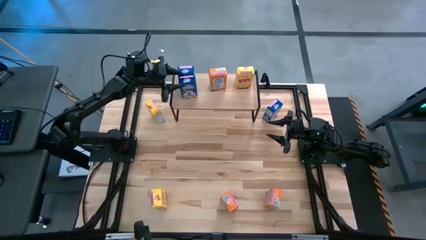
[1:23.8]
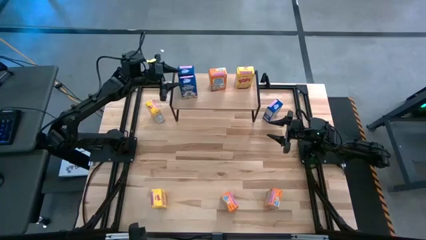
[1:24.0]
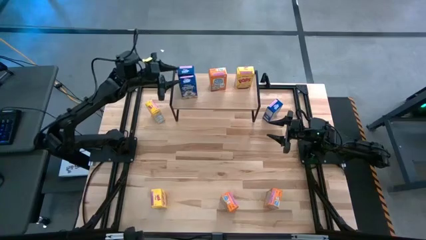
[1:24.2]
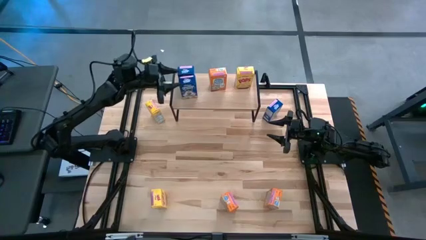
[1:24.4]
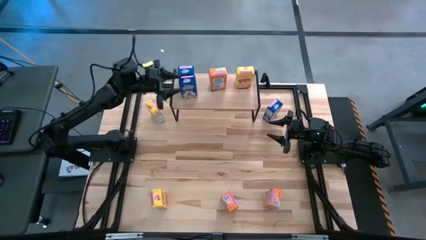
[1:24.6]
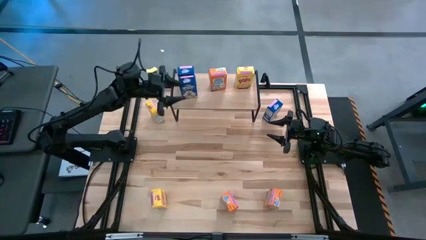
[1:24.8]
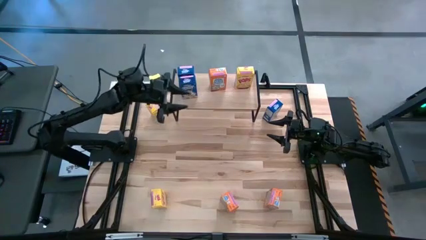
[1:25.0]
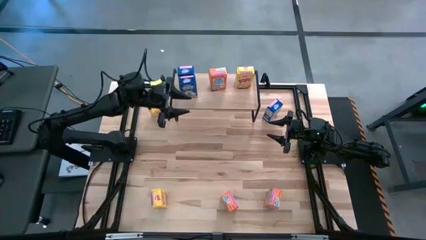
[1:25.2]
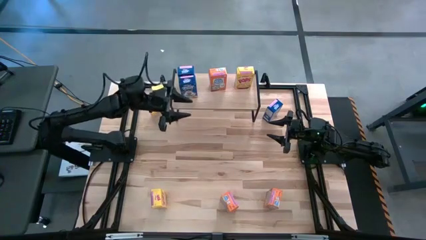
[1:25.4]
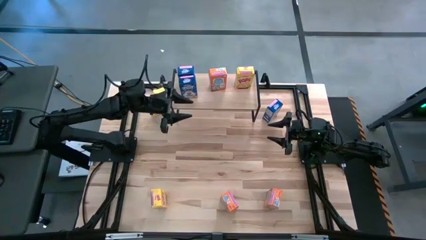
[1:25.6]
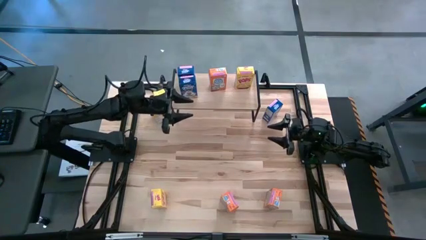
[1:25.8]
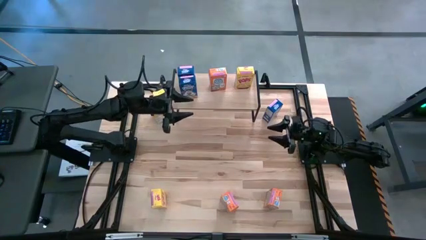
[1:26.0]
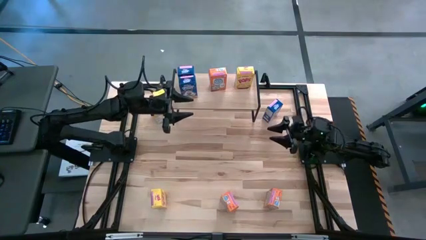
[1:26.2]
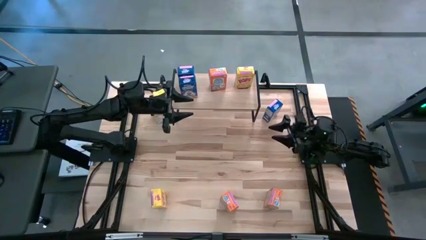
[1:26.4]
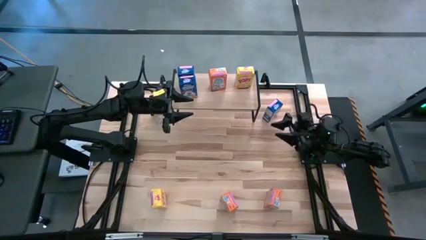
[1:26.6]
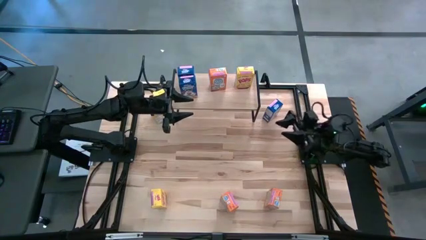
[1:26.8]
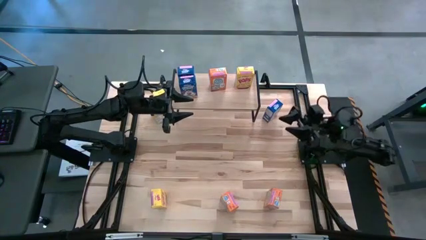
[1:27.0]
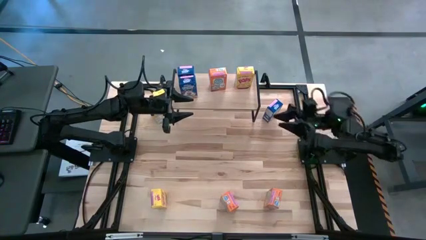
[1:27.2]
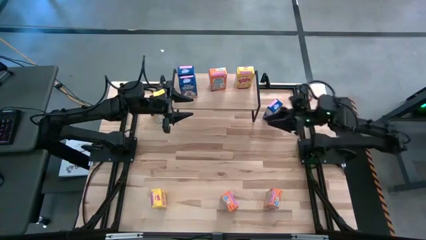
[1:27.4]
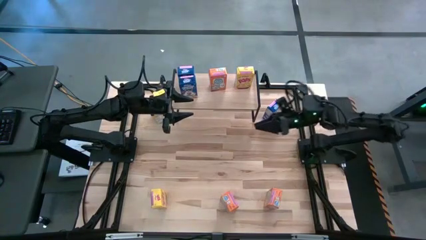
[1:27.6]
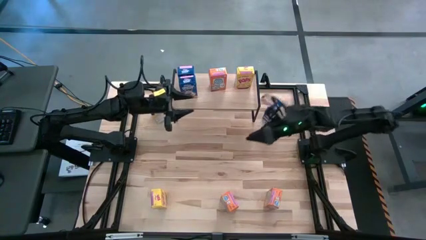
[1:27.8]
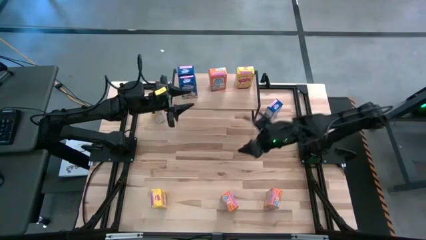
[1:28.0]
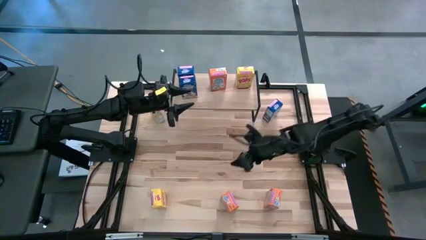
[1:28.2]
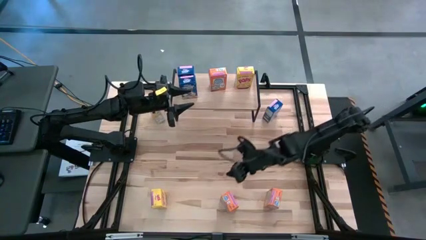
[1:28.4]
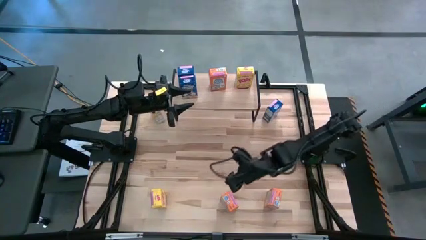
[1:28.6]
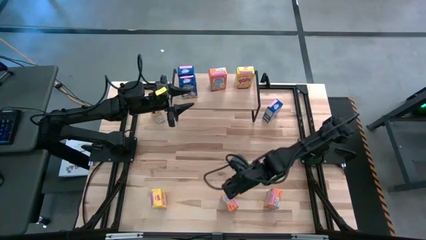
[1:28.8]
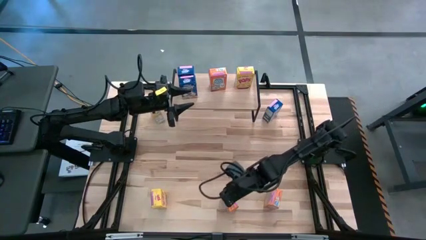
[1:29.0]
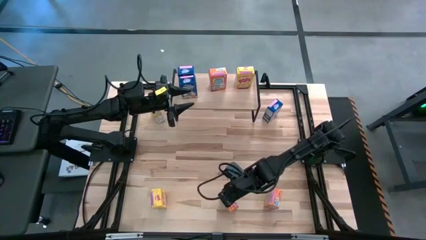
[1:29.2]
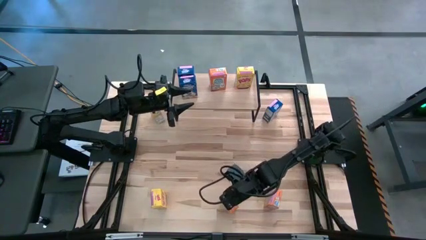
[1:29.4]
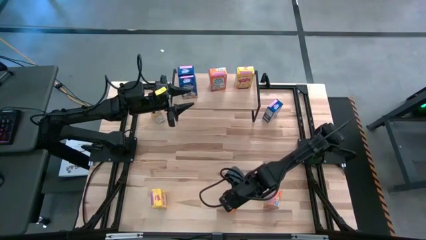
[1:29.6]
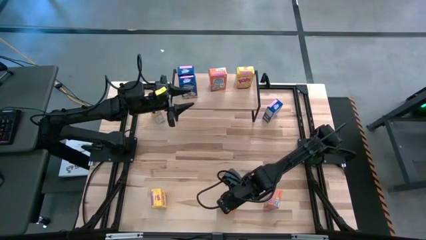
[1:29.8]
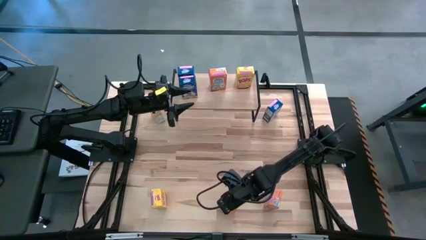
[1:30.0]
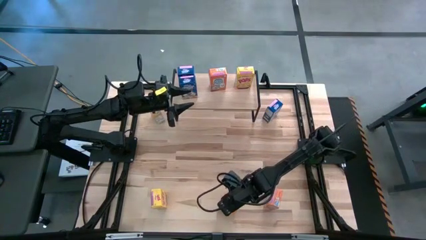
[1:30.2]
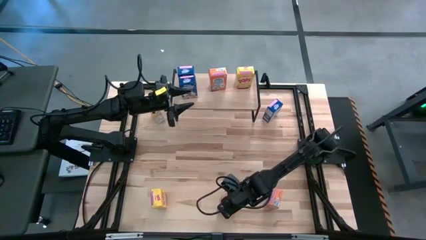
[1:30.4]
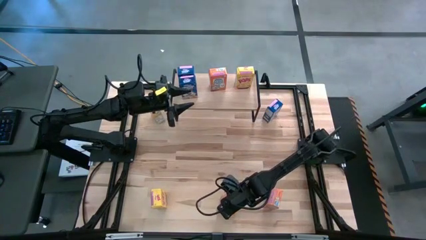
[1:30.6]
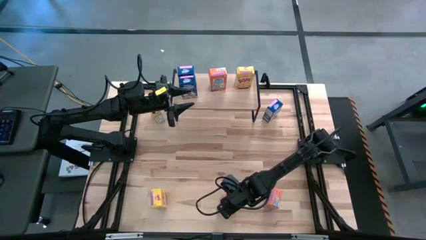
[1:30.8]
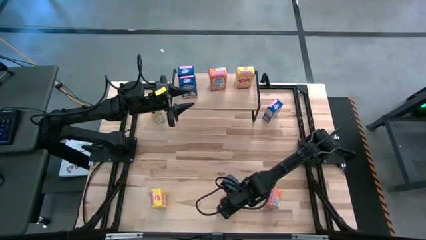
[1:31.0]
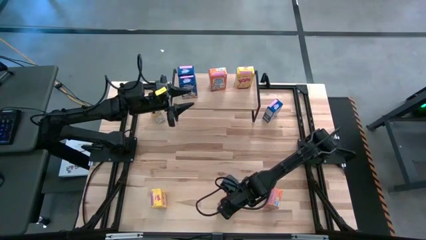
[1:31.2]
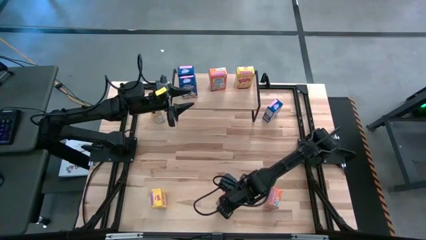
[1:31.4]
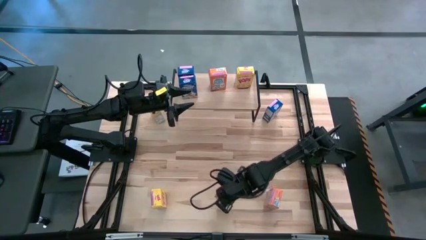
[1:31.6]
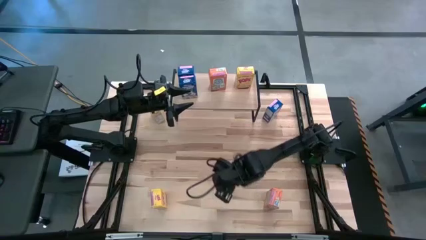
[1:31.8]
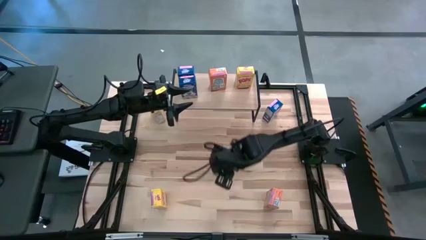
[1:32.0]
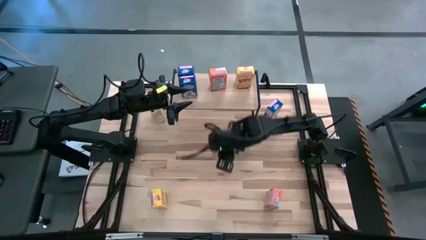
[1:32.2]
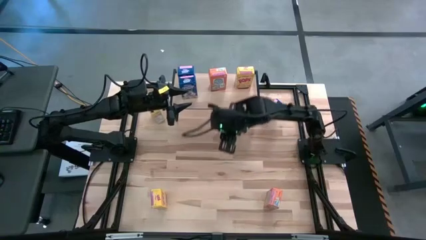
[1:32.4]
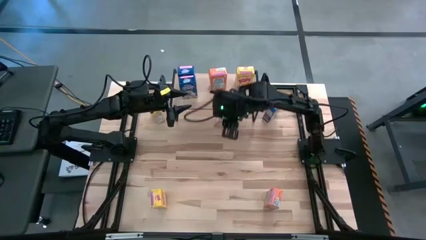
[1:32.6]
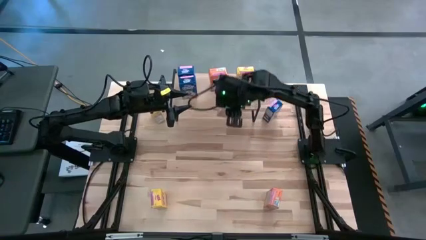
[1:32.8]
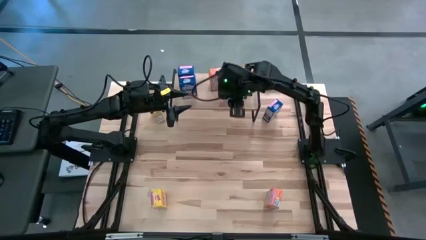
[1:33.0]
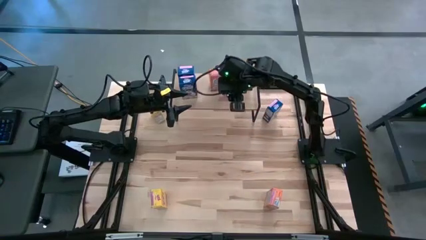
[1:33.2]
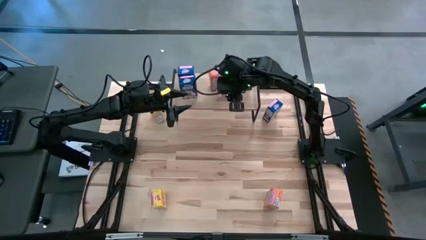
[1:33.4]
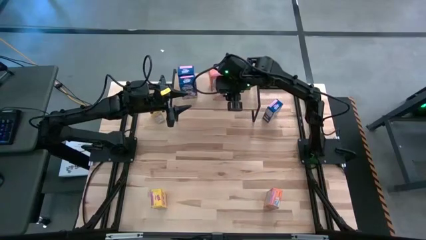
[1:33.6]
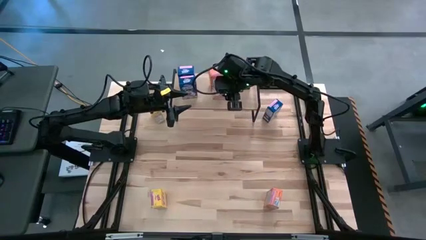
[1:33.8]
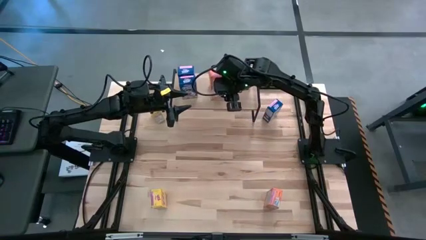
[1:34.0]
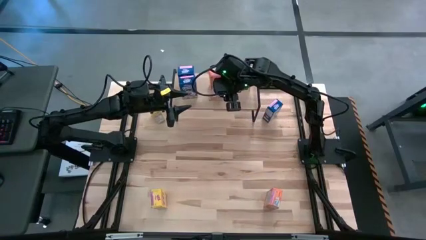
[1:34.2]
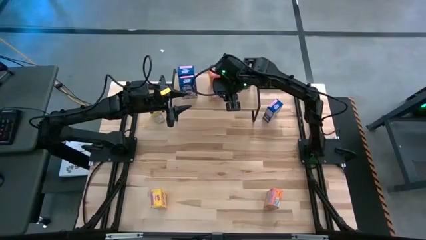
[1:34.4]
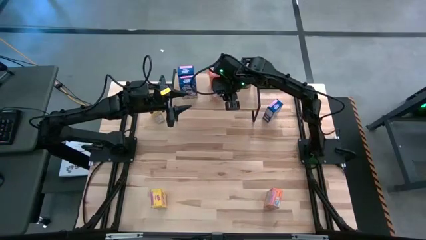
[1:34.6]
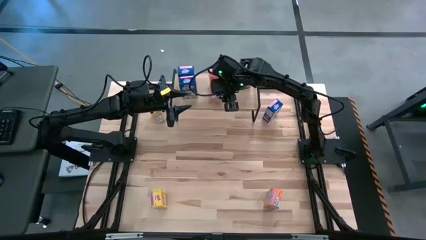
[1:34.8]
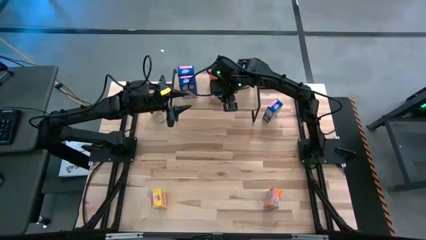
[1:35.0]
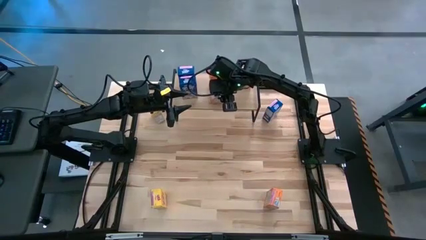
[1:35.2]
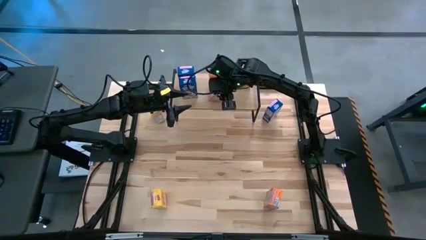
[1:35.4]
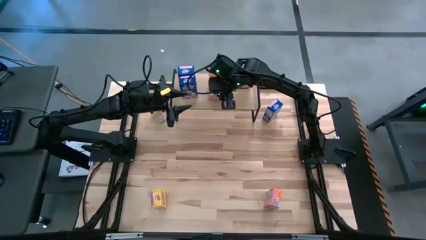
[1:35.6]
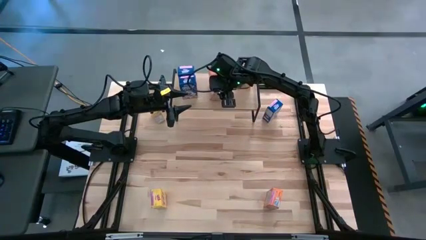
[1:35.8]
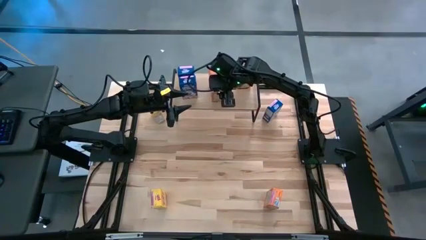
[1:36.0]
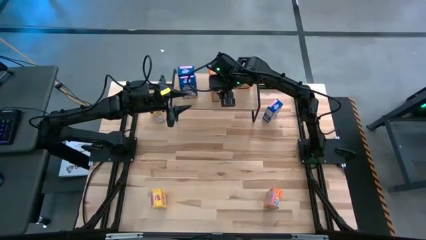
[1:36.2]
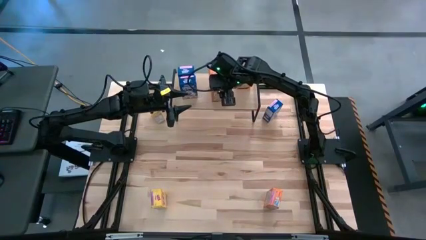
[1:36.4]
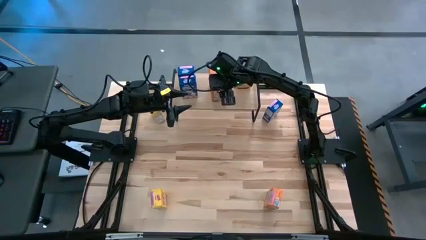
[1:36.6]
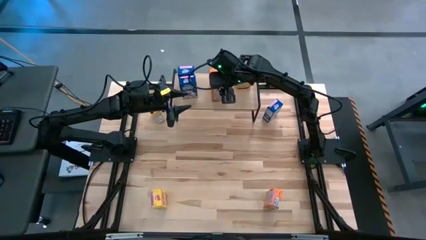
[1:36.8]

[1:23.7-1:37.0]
Task: Stack cereal on shelf
Put the left orange cereal box aligned with the other orange cereal box on the shelf
